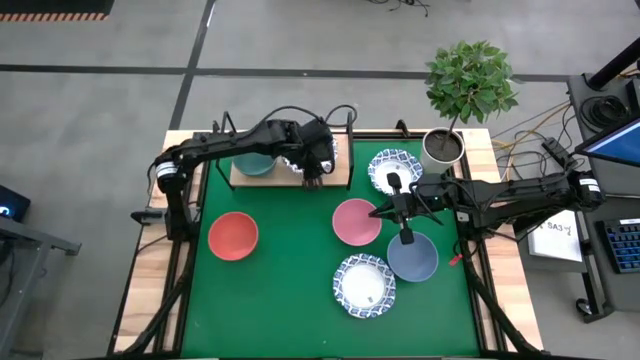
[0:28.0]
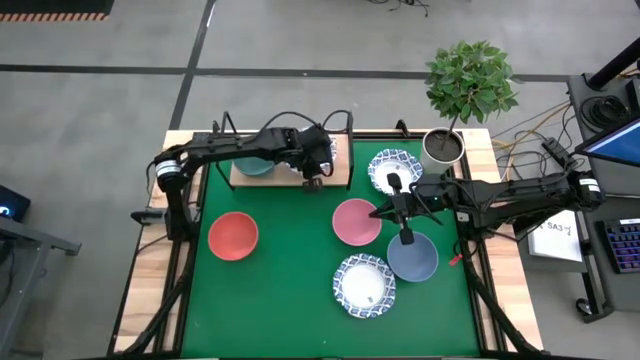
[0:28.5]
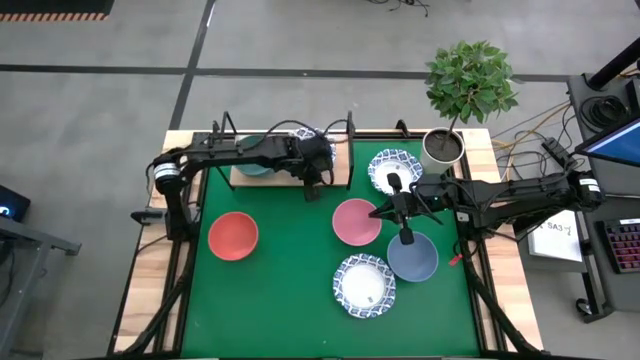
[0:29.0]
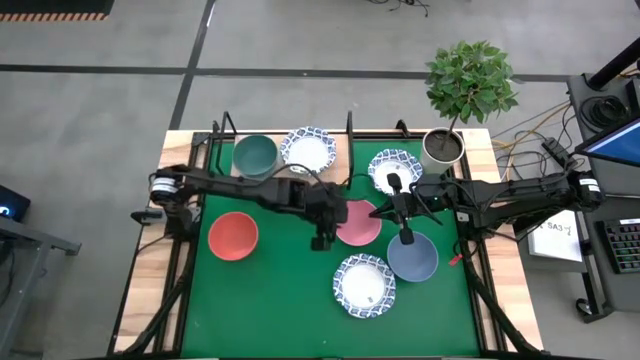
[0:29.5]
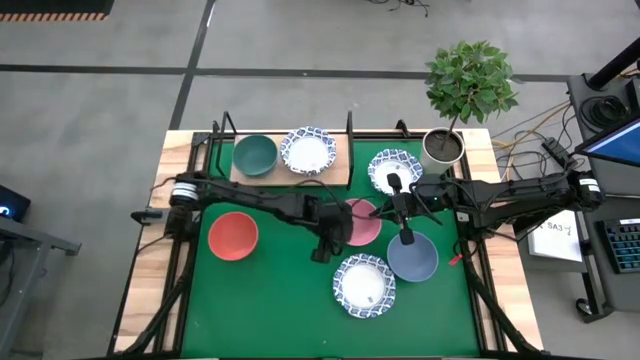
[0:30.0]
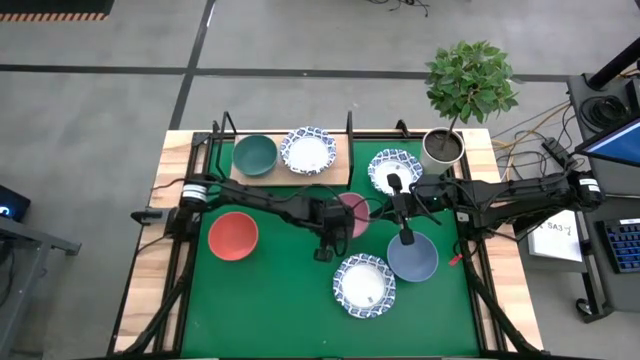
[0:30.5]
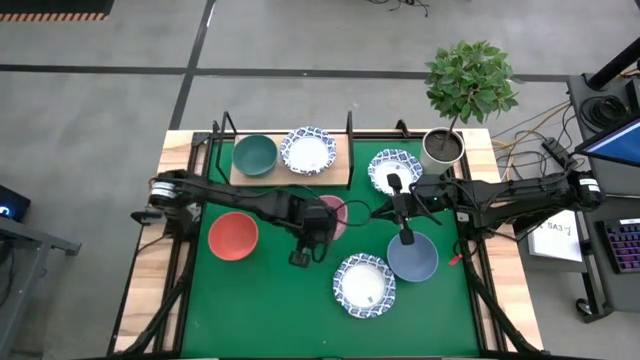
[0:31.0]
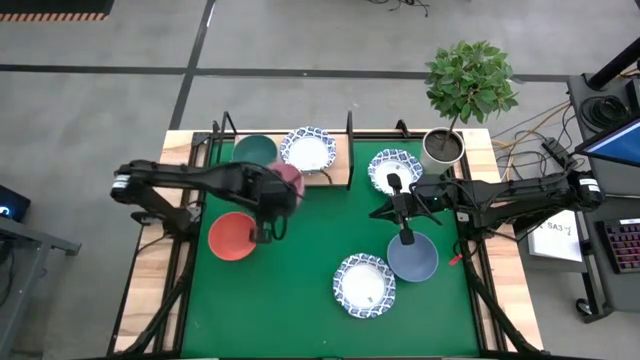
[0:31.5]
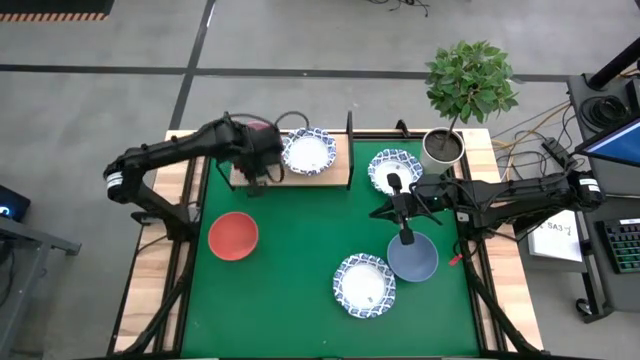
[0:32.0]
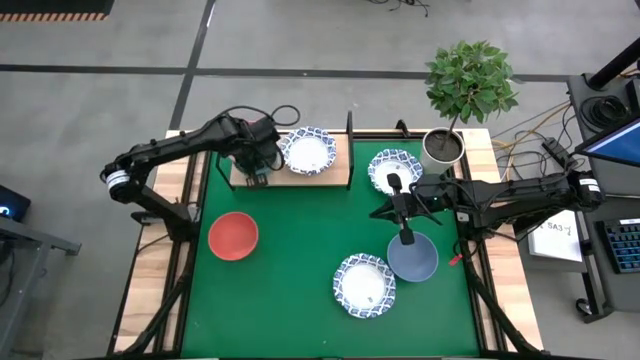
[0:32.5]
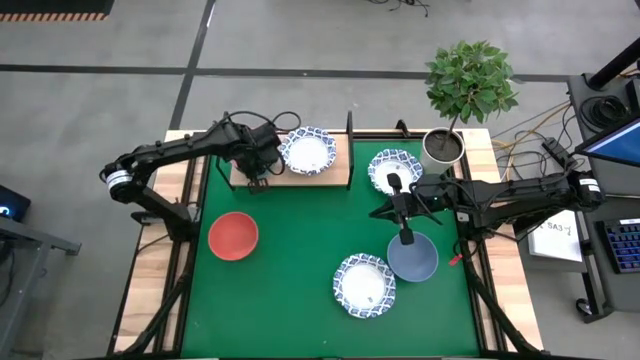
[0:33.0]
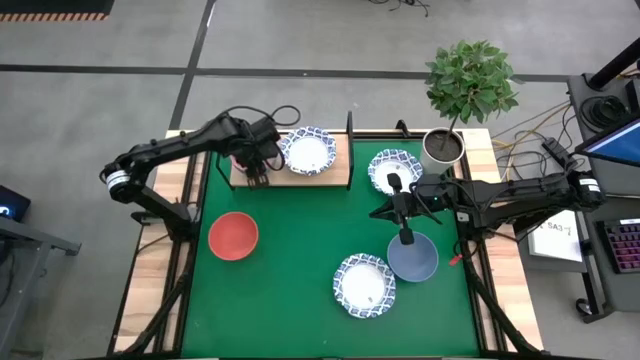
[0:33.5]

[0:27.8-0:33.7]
Task: Place and stack bowls onto a shelf
Stack the pink bowl on top of the green bowl on the shelf

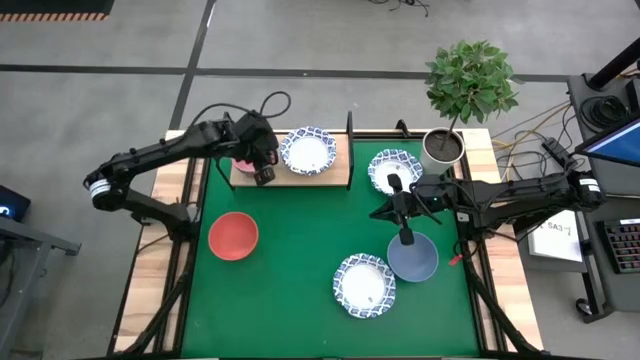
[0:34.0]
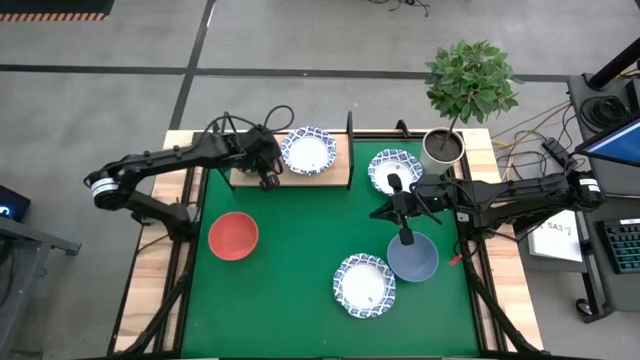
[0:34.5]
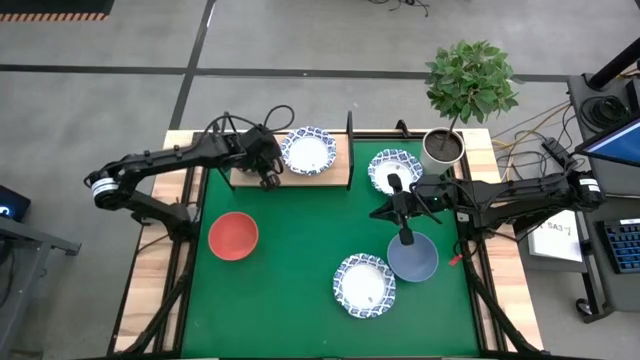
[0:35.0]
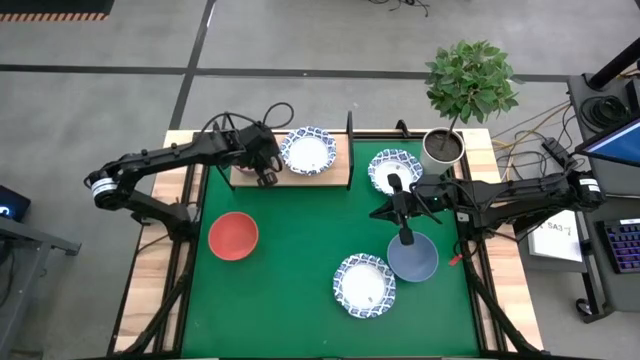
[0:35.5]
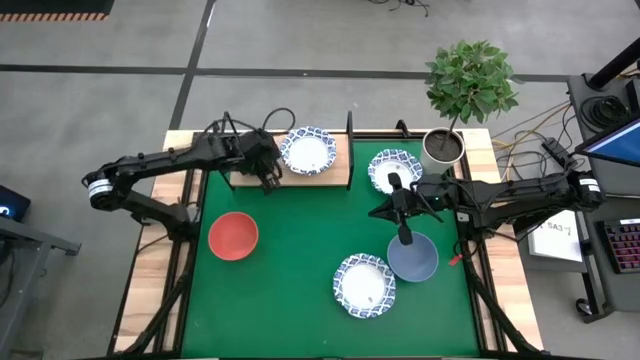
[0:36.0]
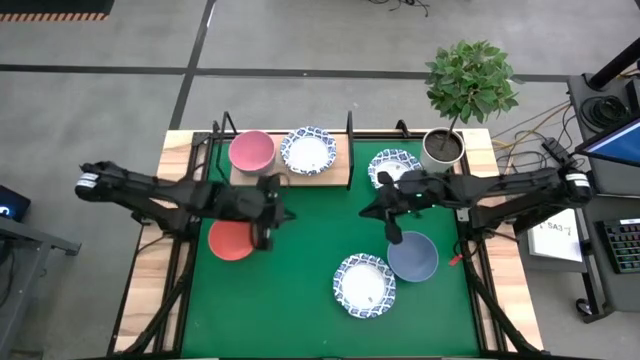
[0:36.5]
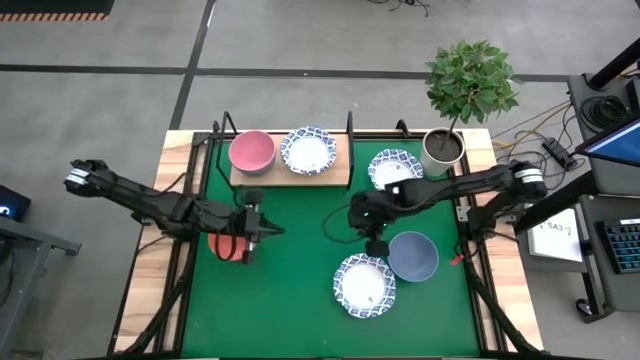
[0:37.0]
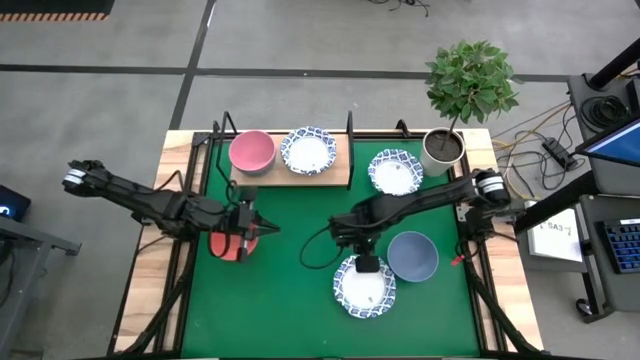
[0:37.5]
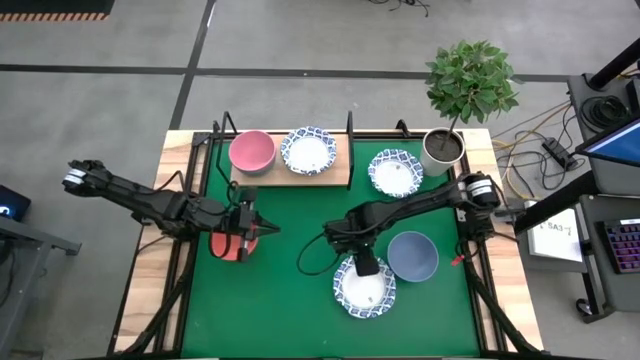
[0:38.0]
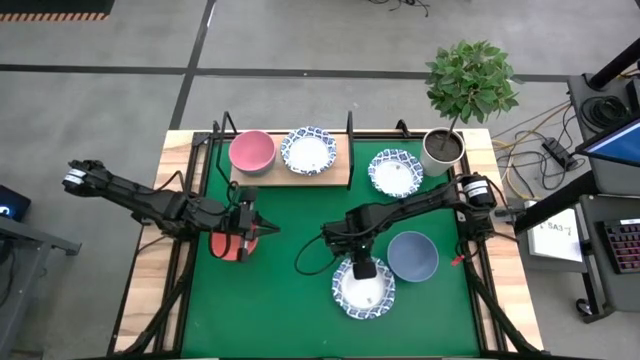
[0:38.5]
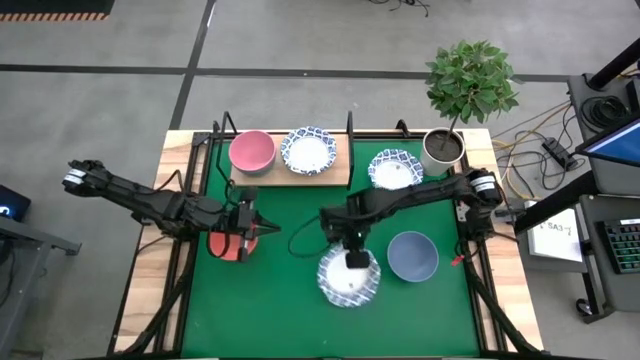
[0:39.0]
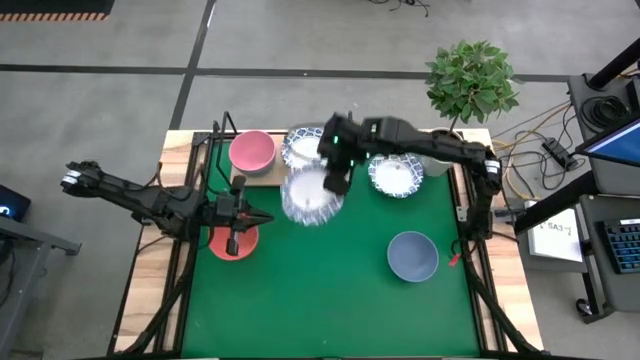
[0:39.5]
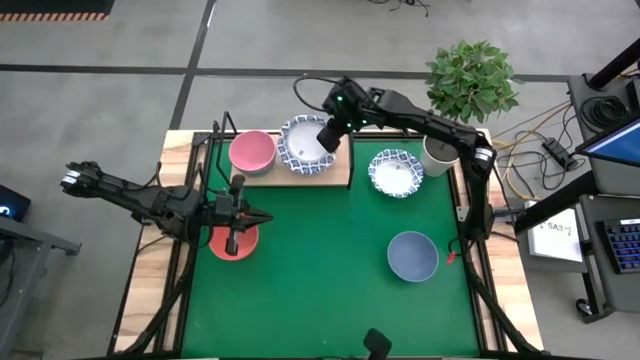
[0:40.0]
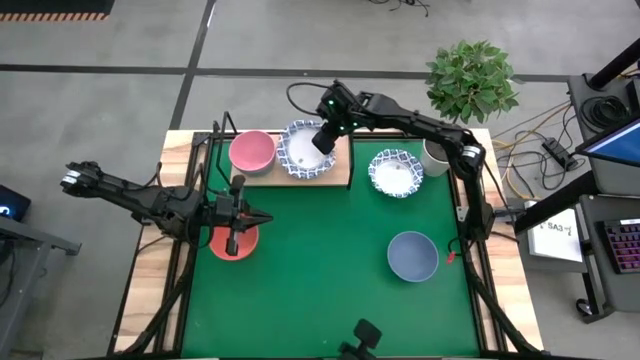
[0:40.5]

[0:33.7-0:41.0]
Stack the white bowl on top of the white bowls on the shelf

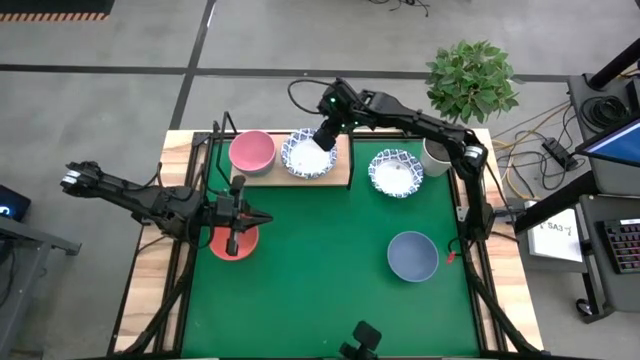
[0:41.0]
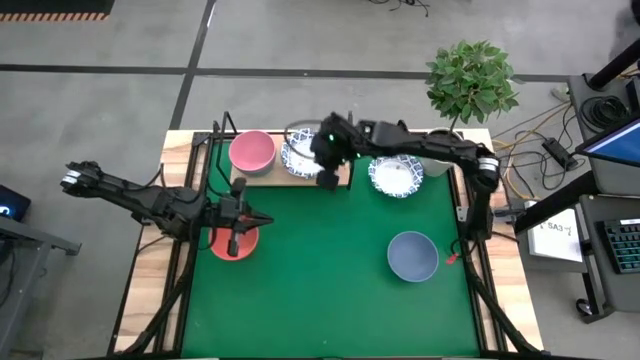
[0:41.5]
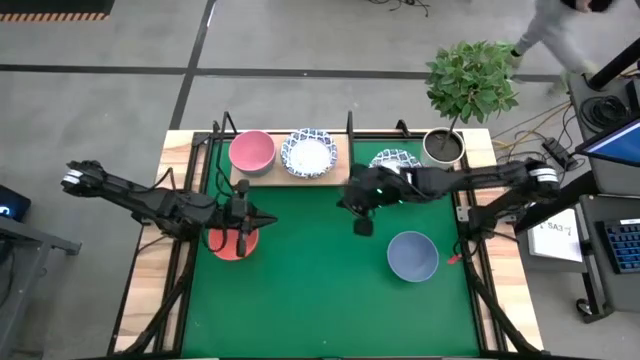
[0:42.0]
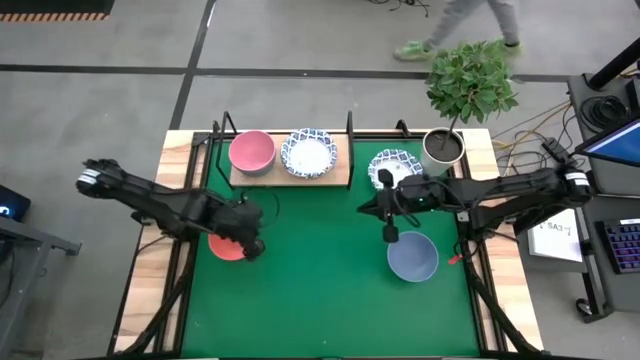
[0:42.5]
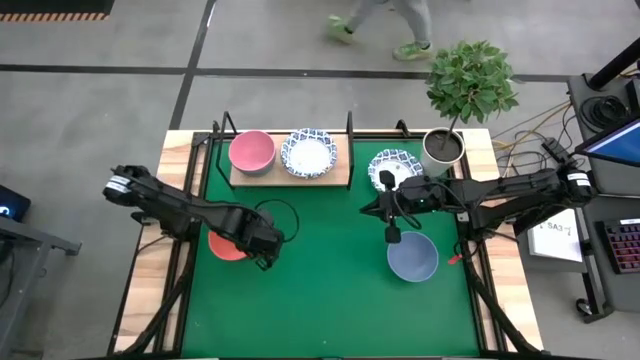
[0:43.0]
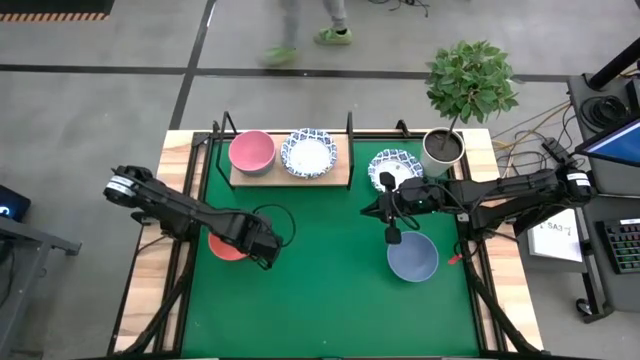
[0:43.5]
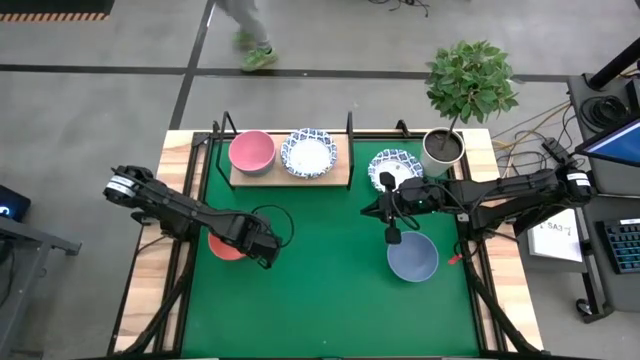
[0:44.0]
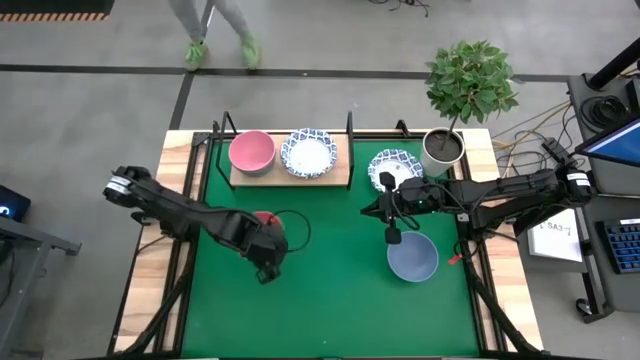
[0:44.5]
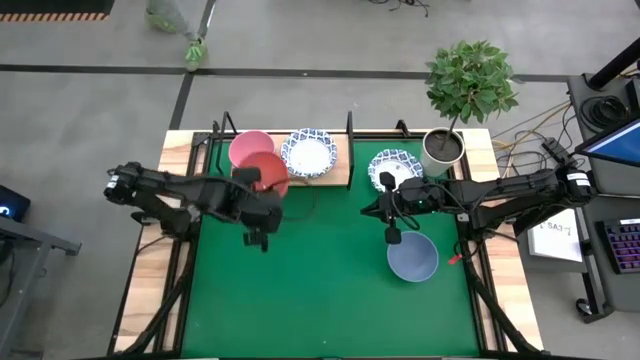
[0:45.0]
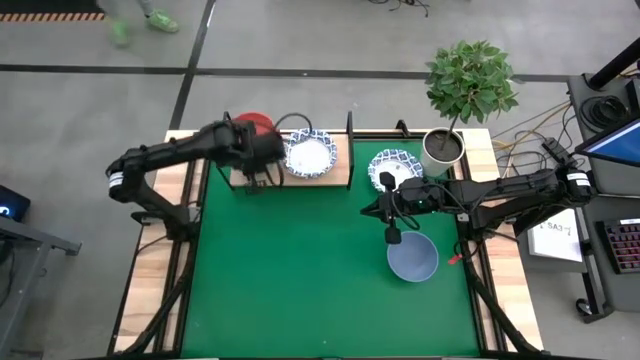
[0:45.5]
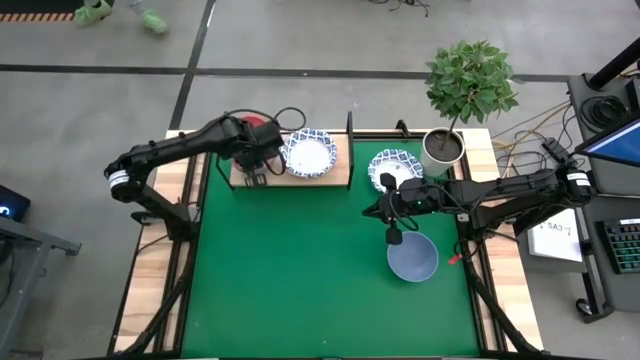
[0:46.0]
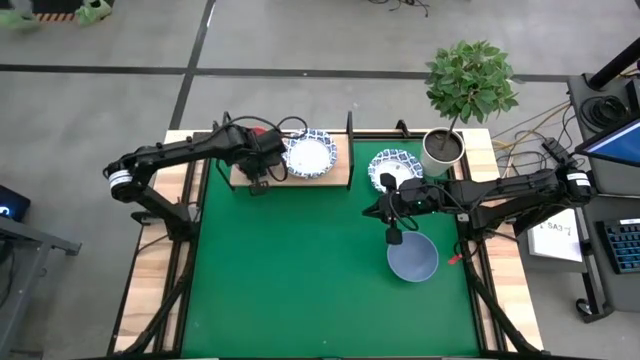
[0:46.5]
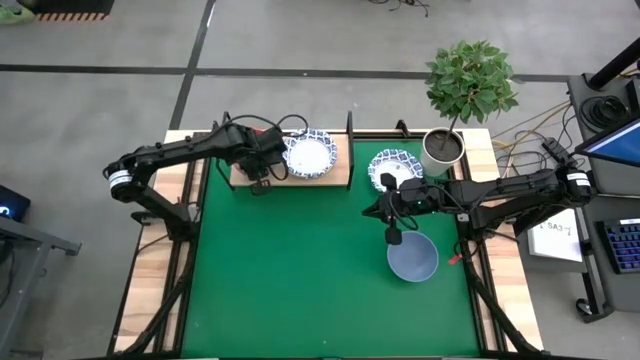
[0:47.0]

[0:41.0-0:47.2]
Stack the orange bowl on top of the pink bowl on the shelf

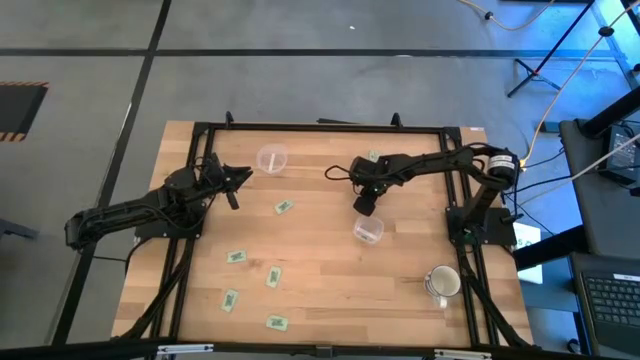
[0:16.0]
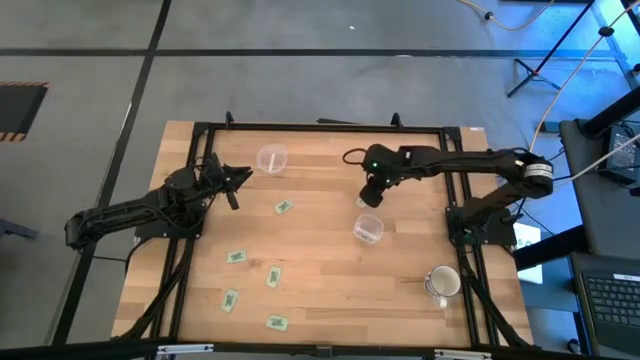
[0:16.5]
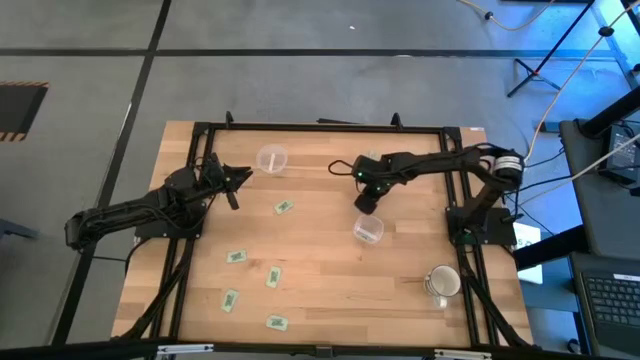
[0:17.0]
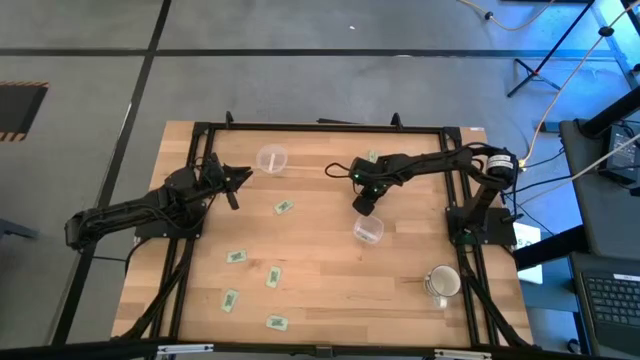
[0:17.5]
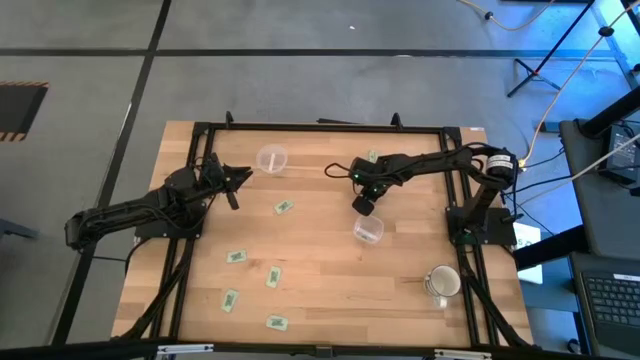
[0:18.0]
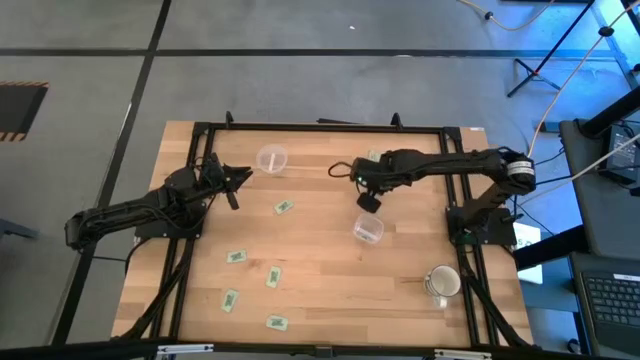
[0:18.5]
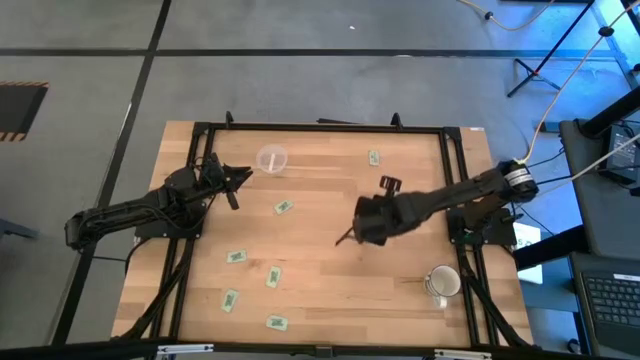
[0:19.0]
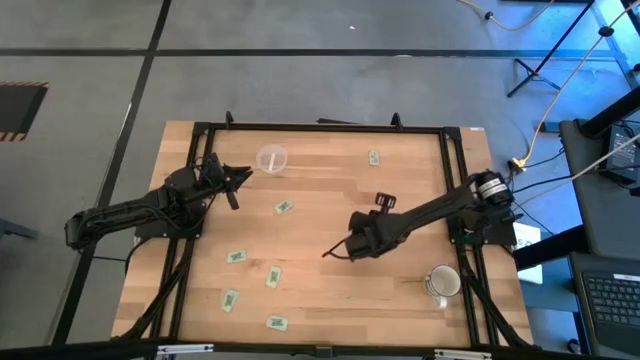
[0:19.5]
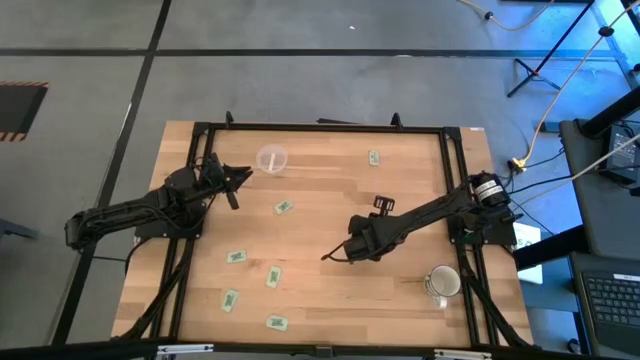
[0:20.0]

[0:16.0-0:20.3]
Task: Pick and place Stevia / Truvia into bins
Put the stevia packet into the bottom transparent container
